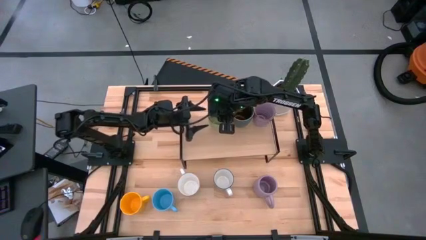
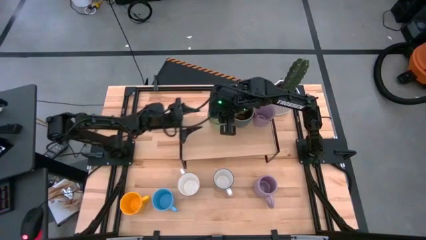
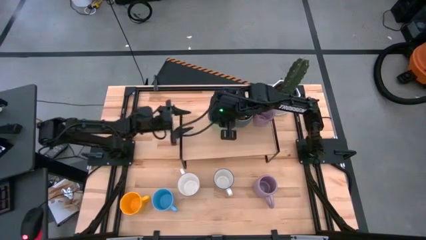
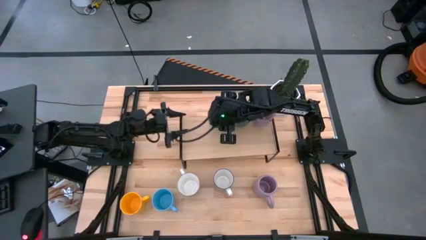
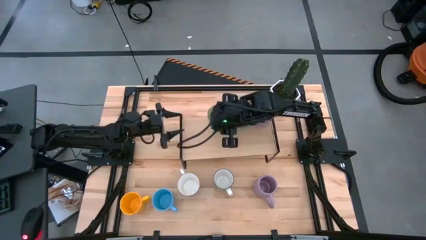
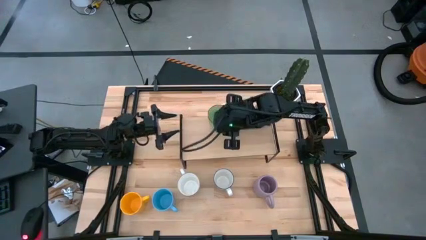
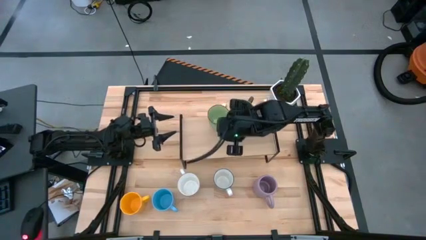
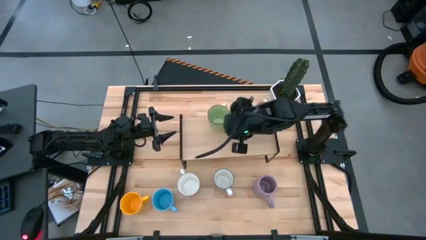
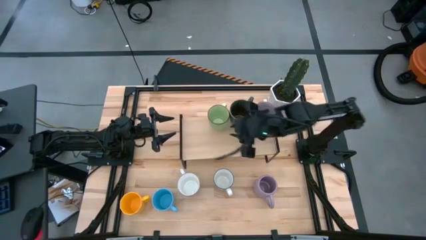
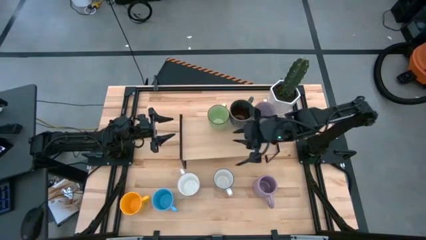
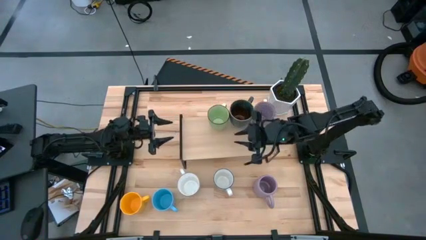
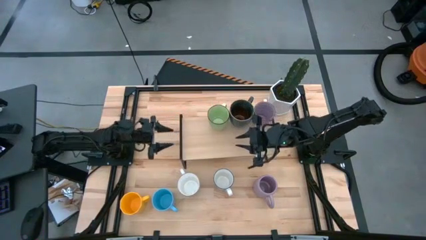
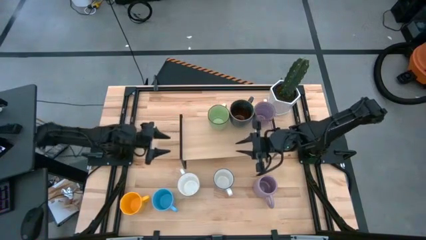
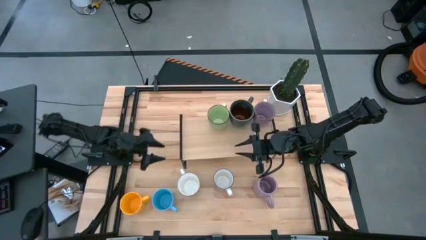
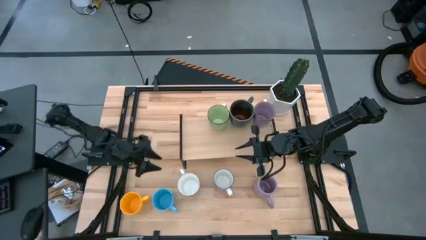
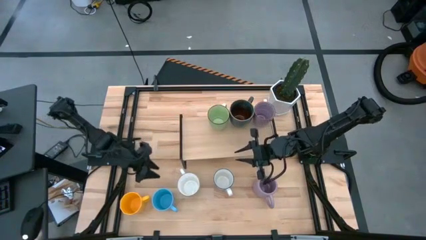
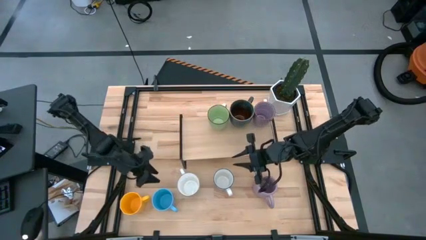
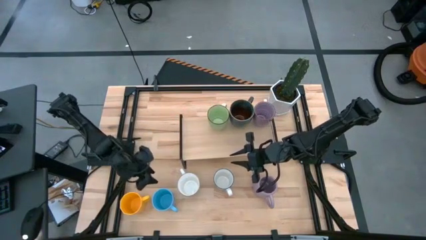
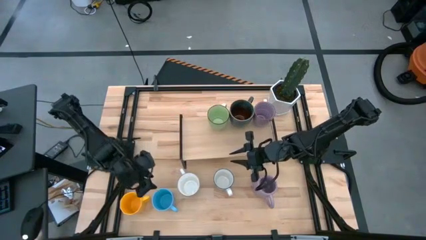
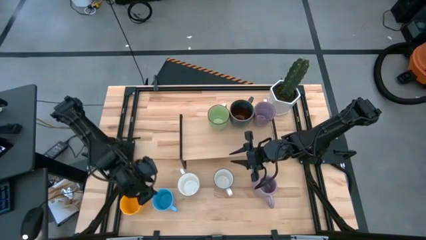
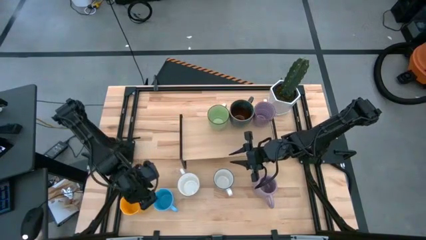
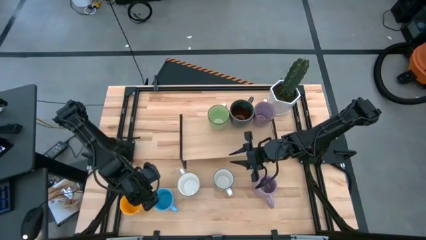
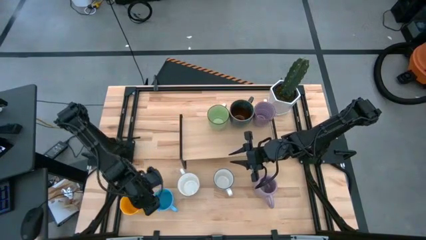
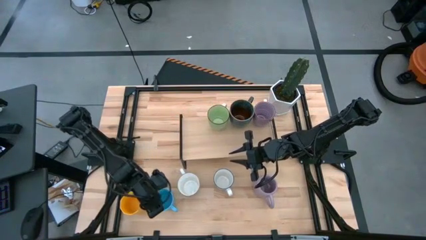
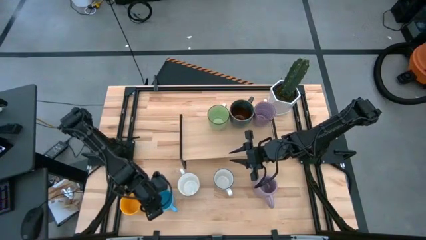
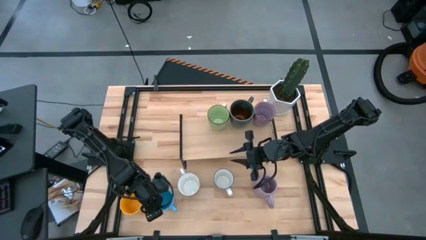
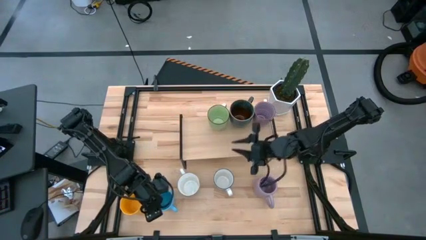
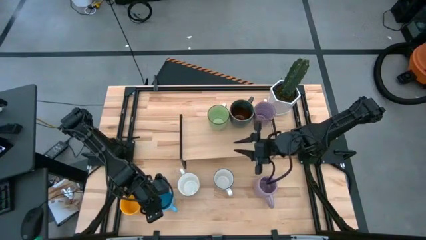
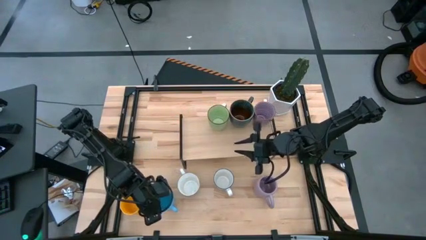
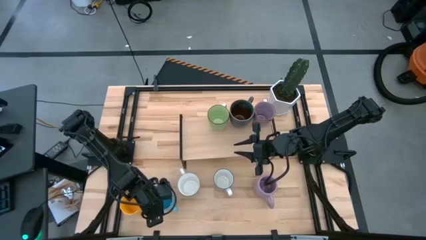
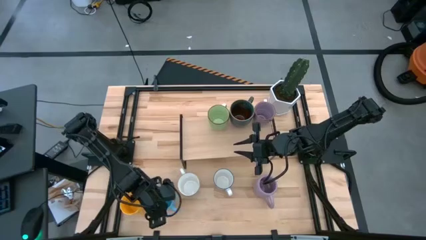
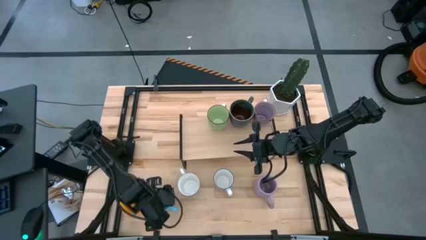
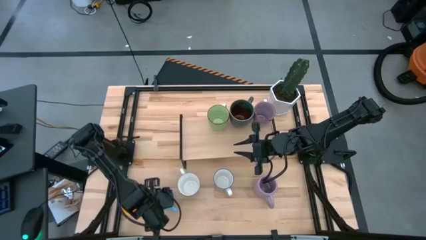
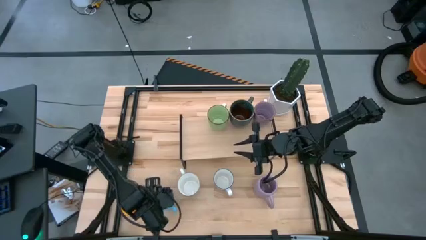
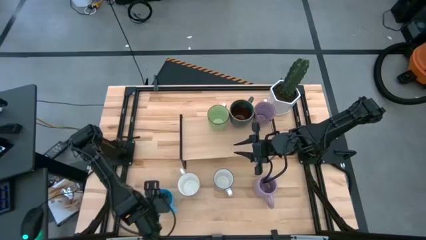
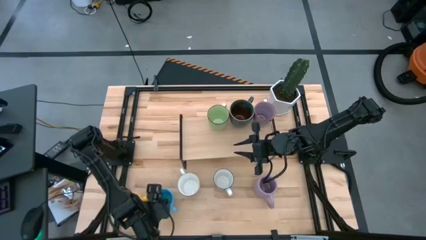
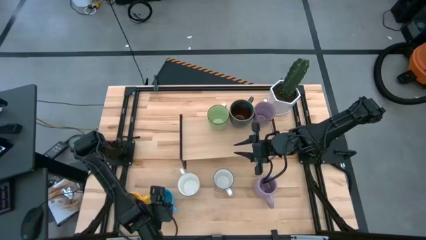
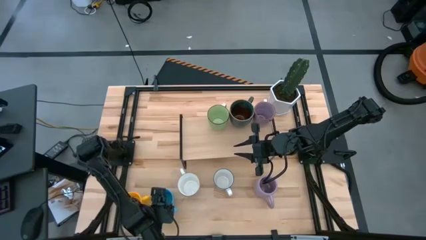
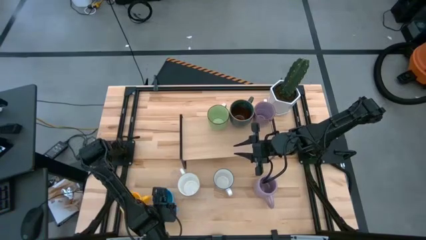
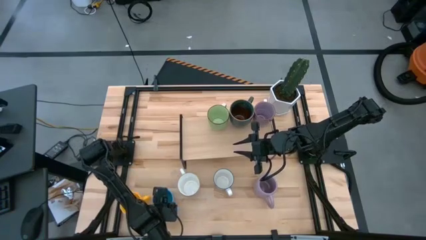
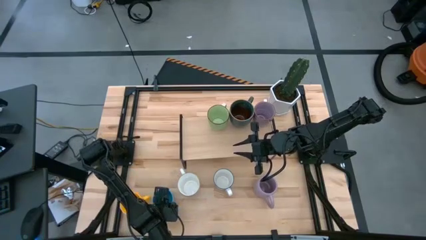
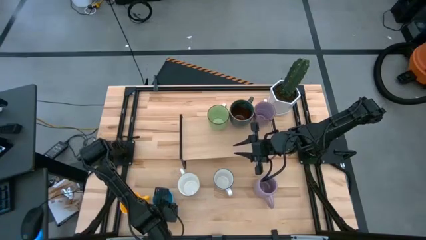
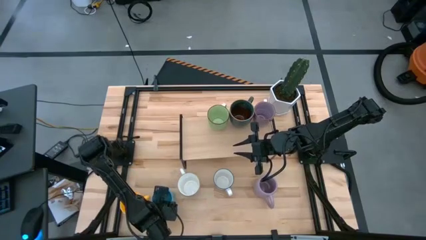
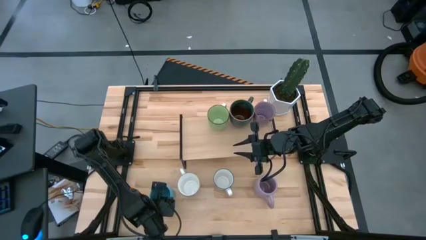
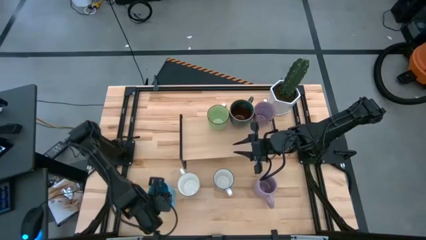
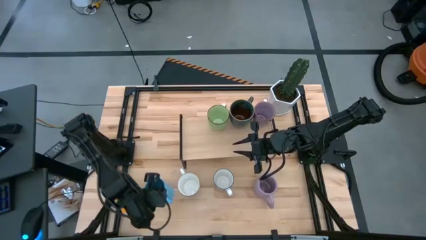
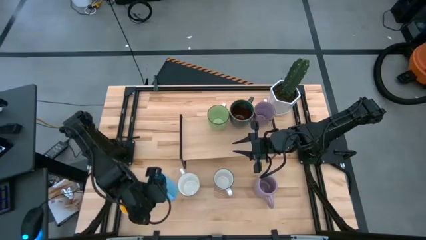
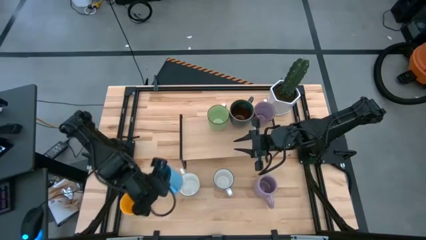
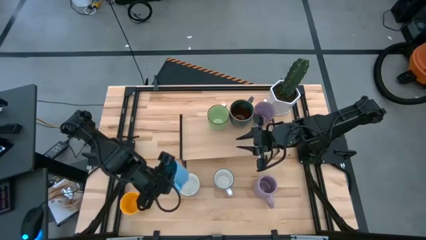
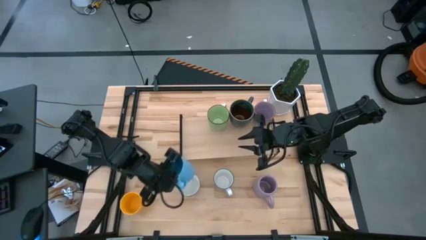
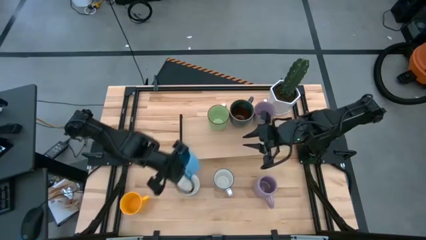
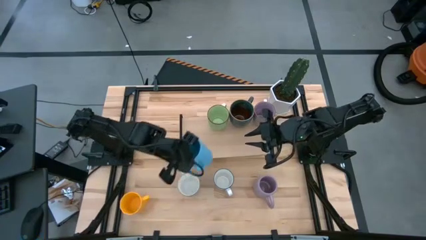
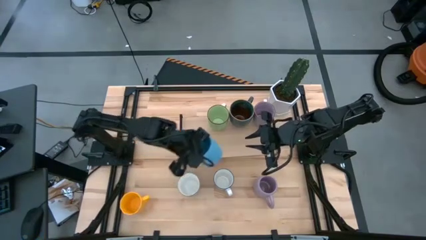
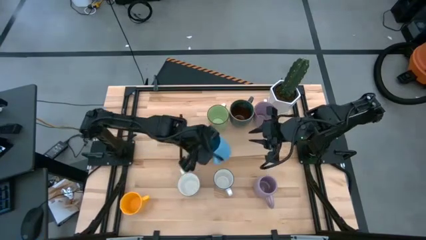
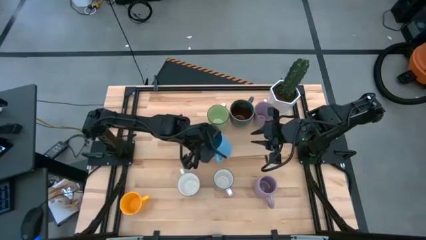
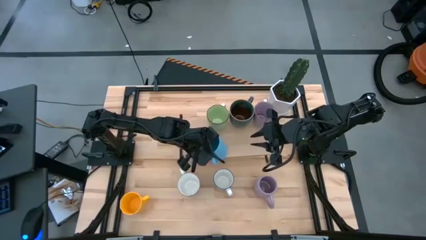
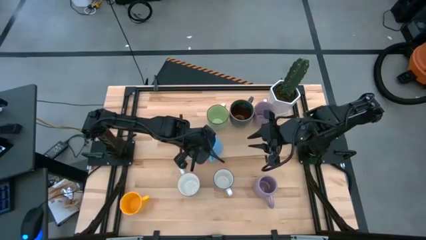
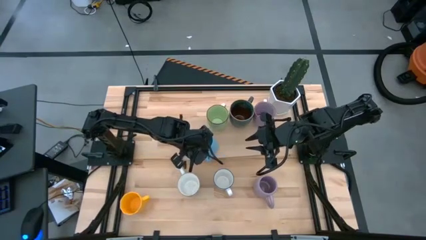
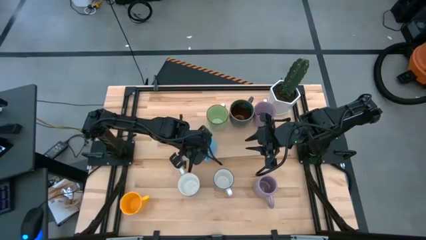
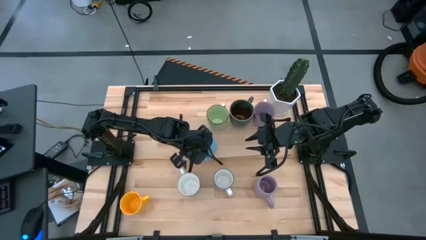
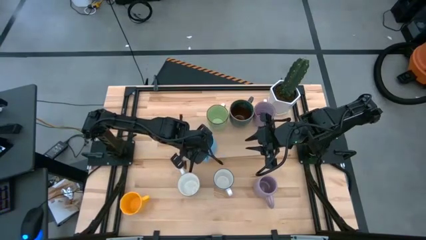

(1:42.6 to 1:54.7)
Task: Place coffee mugs
Put the blue mug on the shelf aligned with the other purple mug on the shelf

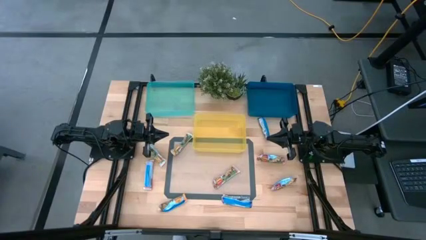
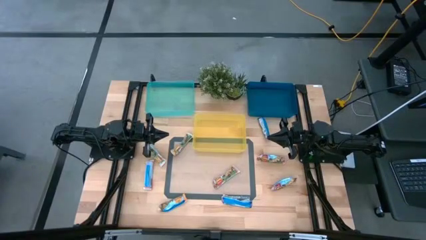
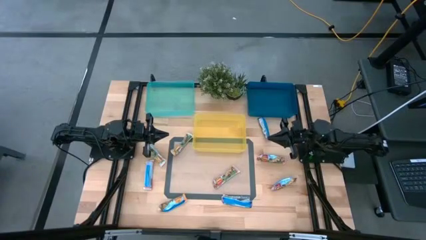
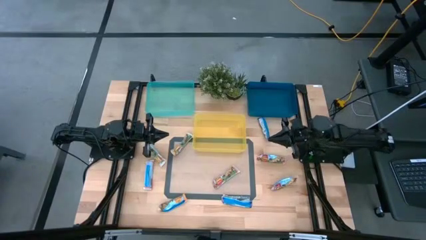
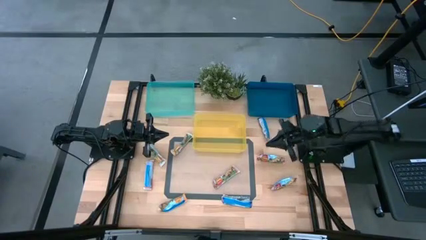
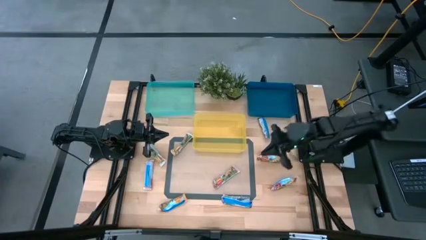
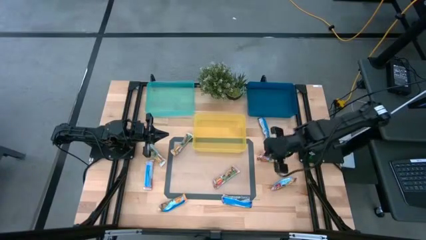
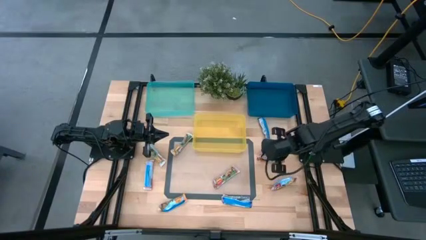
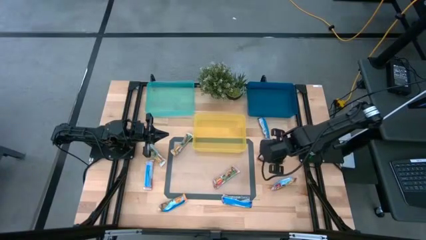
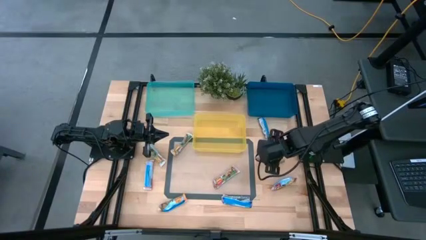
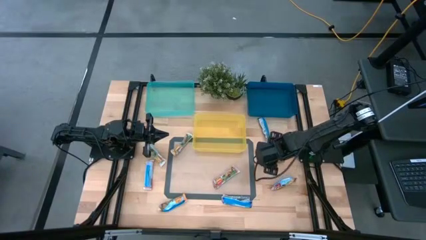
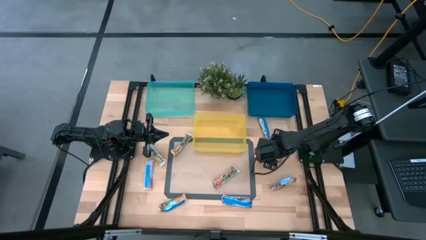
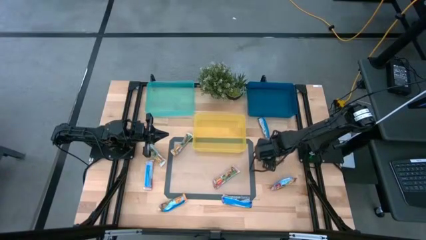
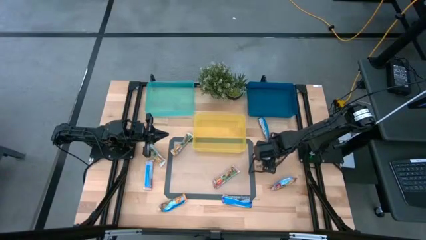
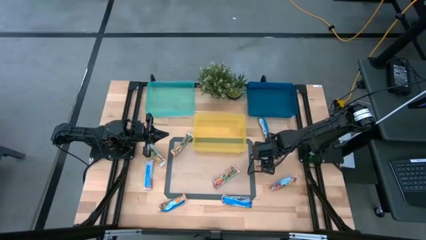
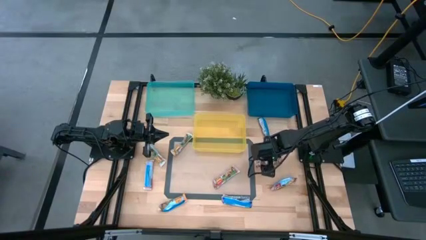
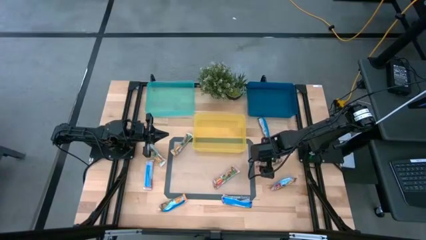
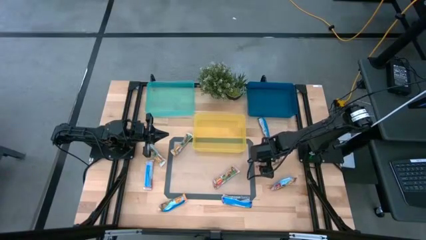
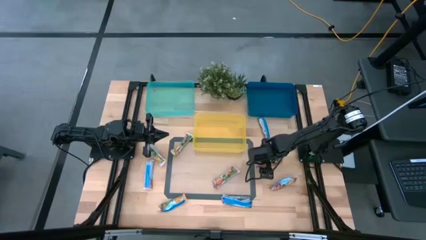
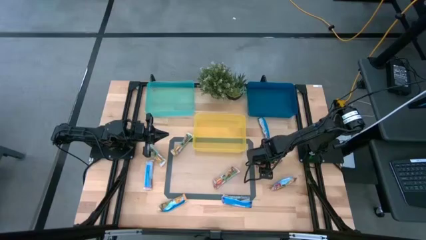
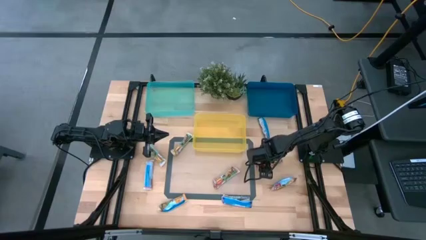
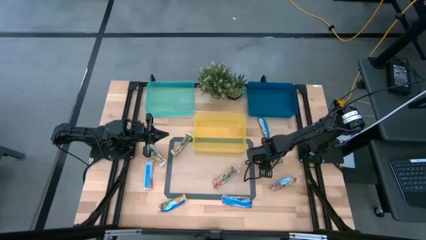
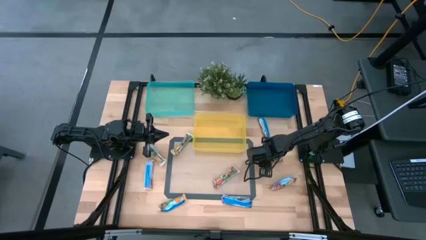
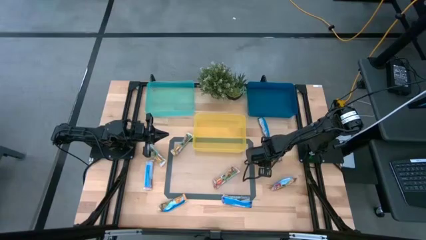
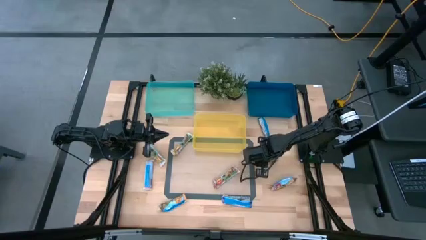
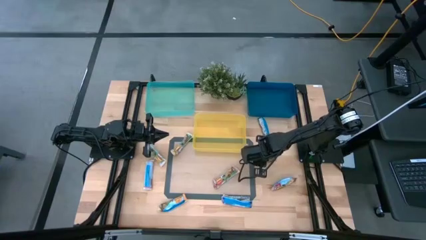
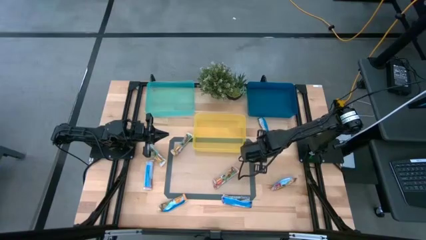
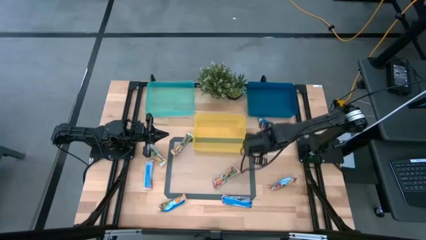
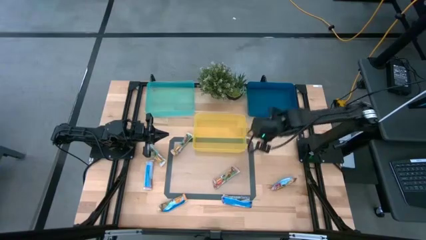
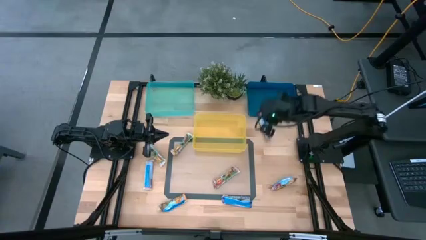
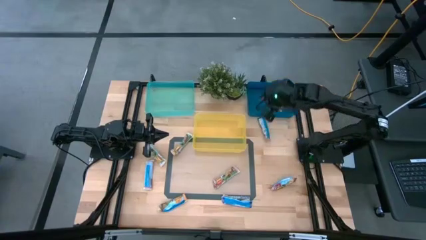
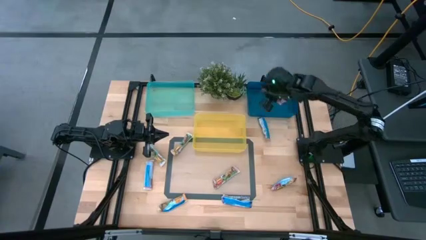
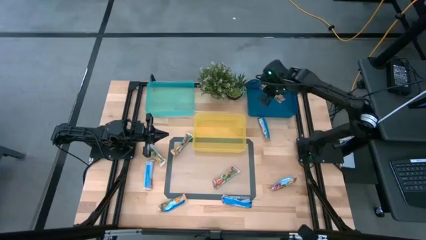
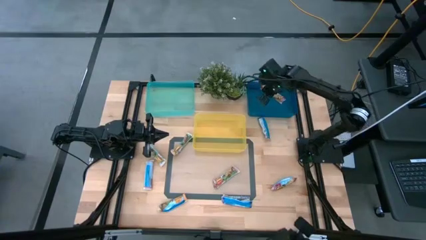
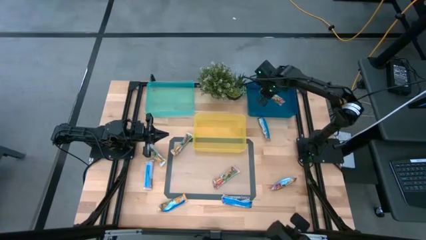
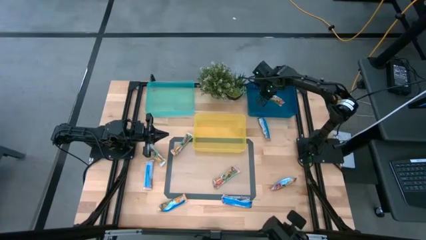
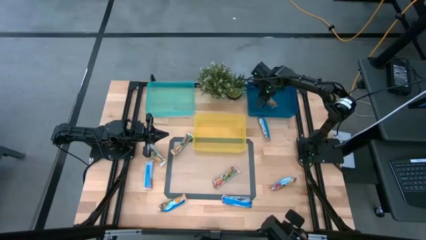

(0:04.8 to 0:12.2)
Task: Pick and place Granola Bars by type
Put the red granola bar into the blue bin
